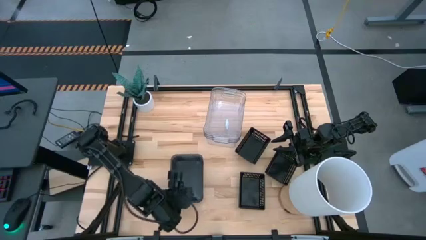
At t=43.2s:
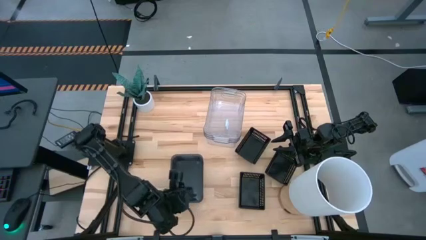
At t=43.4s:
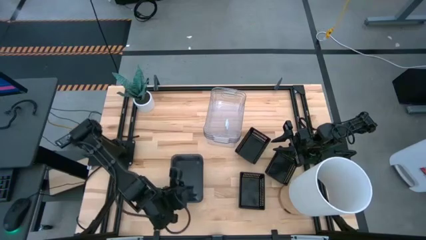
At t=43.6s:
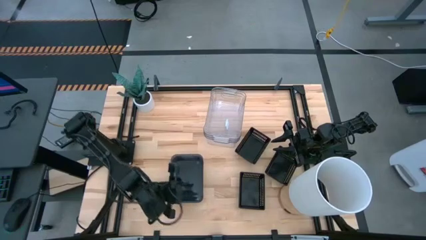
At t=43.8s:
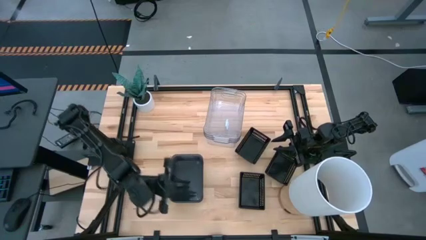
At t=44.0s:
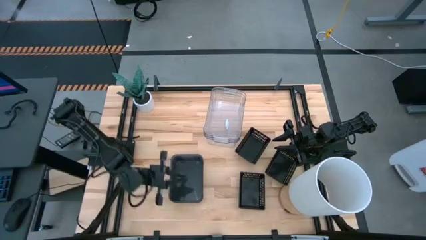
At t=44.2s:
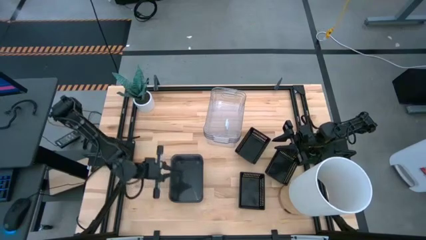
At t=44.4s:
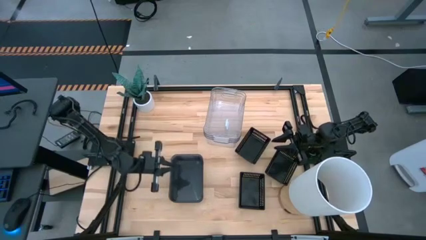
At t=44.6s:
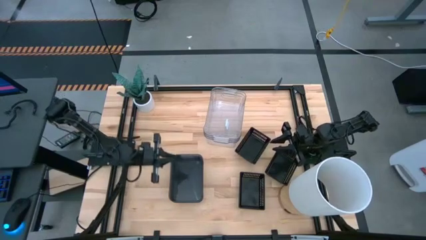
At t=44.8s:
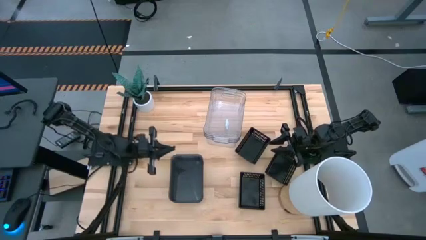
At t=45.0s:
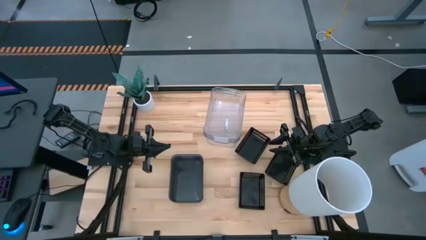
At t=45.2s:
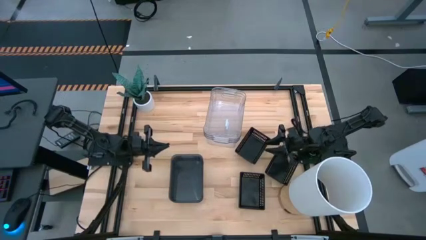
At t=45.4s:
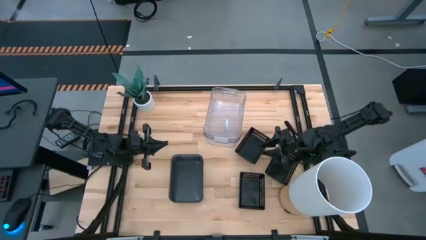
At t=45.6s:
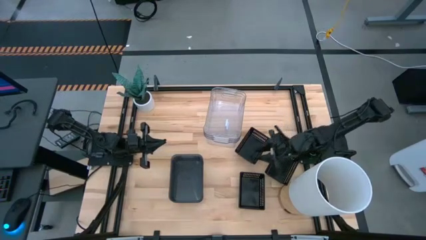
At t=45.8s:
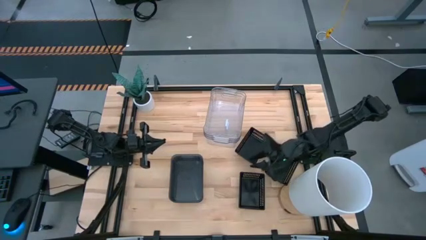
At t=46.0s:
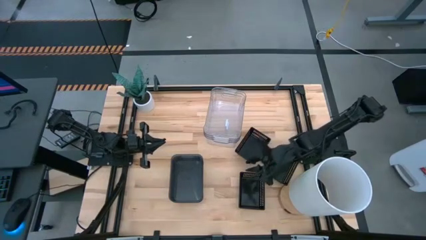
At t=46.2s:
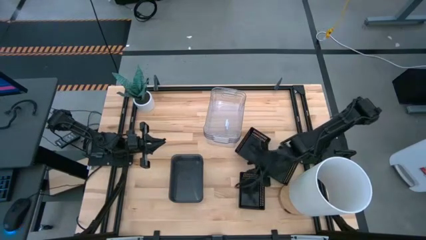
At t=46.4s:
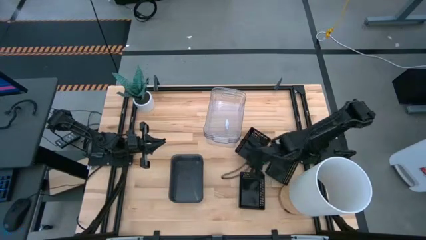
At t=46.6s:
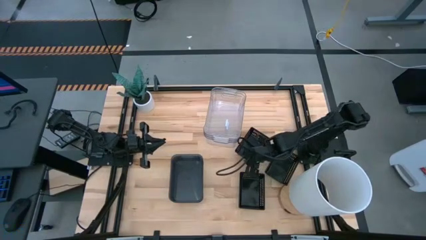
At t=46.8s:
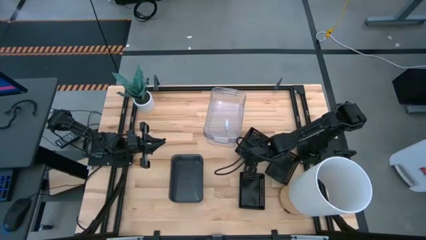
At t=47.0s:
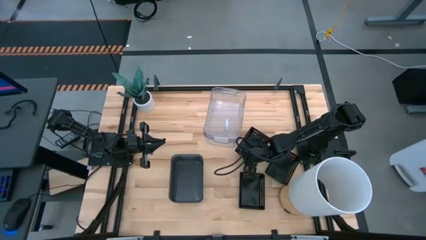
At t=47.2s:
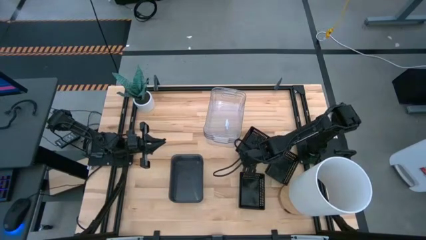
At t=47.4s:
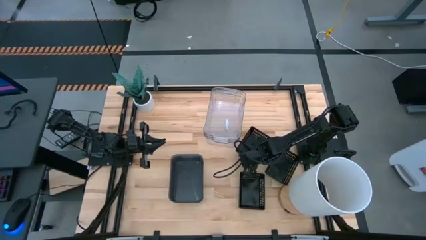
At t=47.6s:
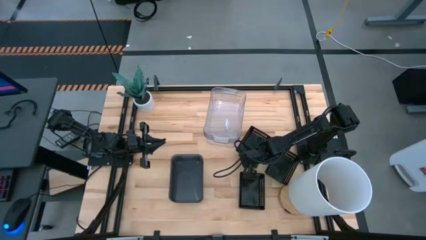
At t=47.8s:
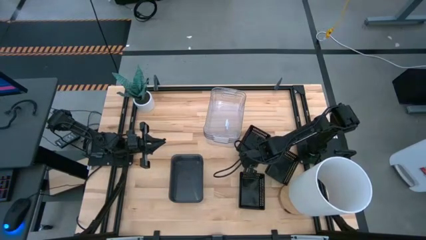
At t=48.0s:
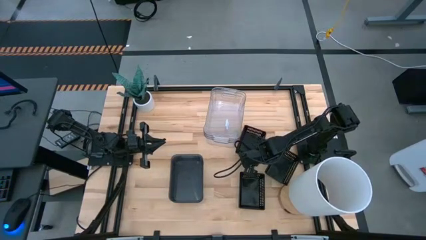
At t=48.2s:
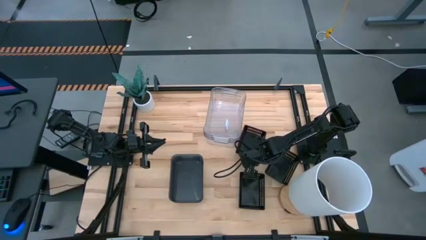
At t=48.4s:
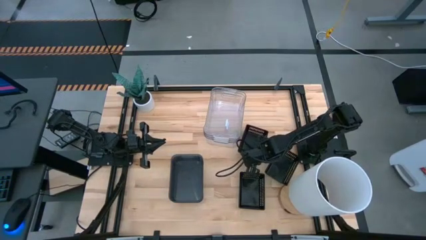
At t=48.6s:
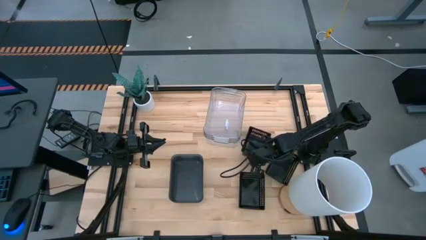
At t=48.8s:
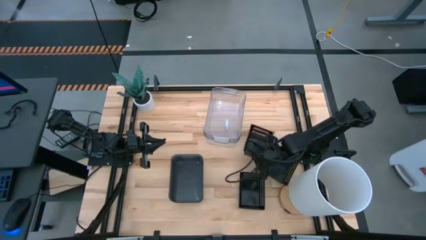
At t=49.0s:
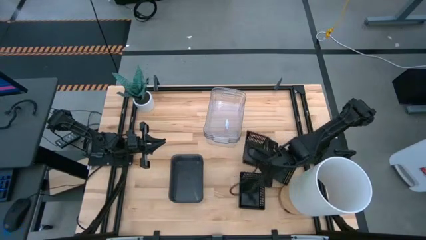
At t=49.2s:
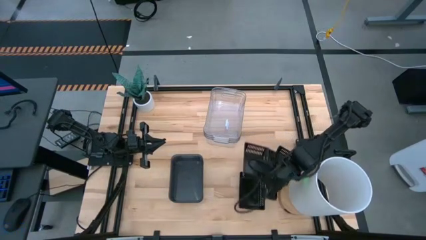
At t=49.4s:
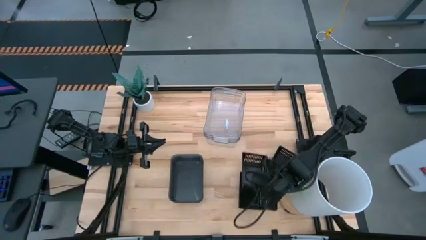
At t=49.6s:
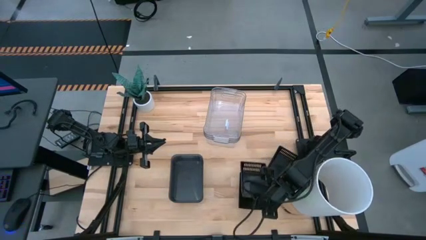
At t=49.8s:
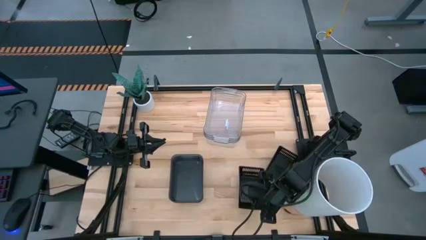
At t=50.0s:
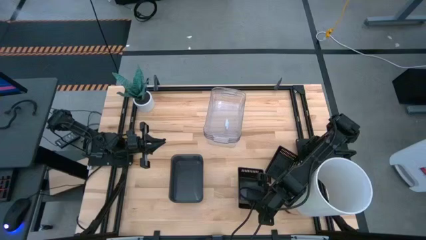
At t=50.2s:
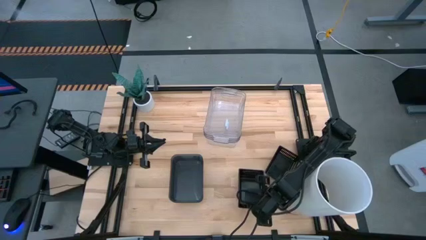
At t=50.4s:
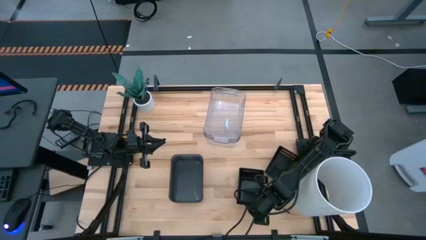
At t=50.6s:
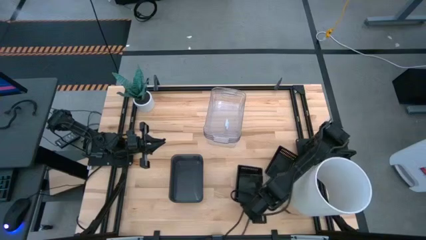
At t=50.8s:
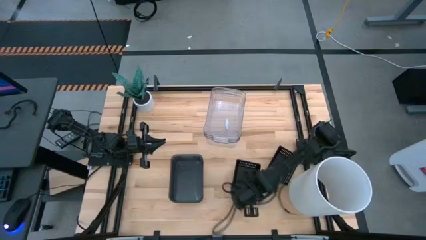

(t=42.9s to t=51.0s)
Stack the top left black bin on top of the bottom black bin

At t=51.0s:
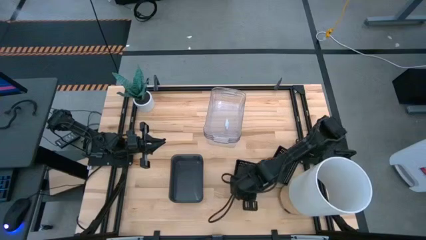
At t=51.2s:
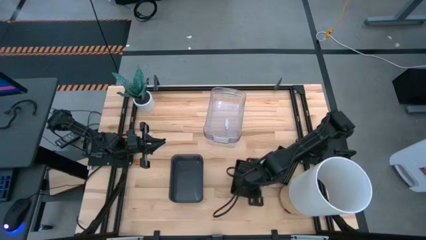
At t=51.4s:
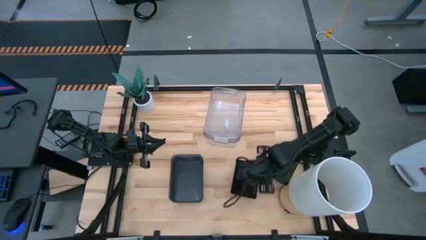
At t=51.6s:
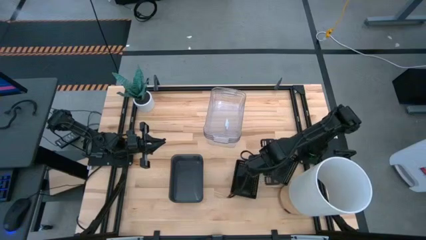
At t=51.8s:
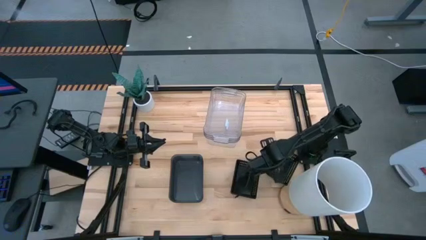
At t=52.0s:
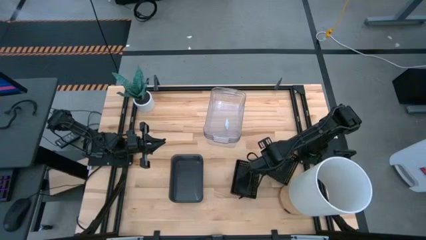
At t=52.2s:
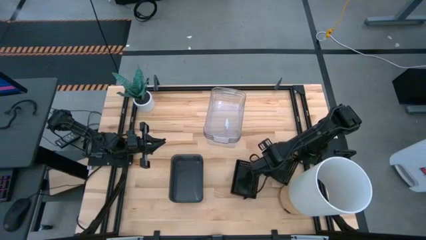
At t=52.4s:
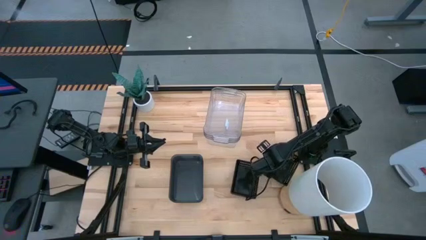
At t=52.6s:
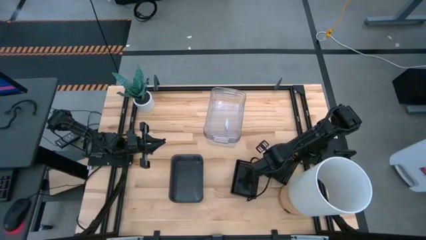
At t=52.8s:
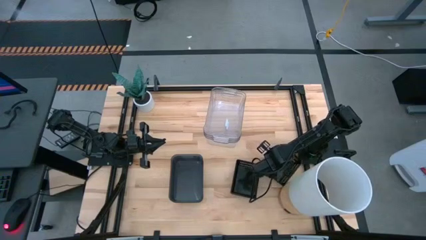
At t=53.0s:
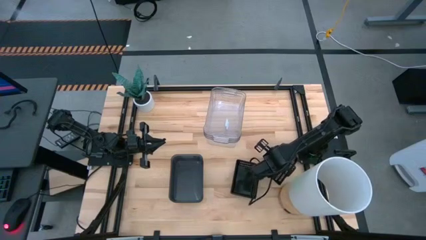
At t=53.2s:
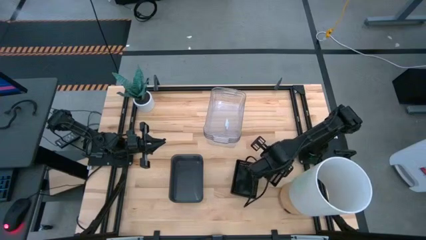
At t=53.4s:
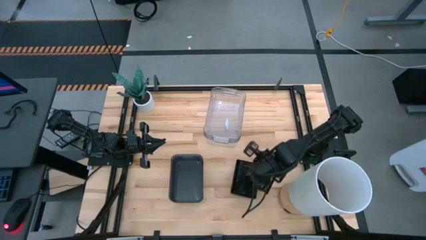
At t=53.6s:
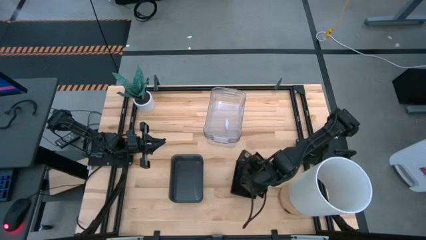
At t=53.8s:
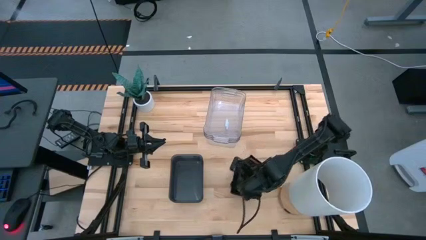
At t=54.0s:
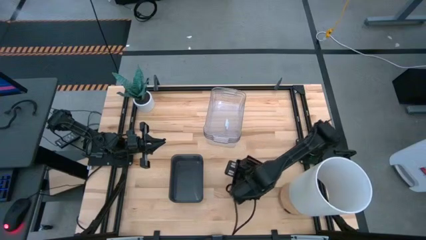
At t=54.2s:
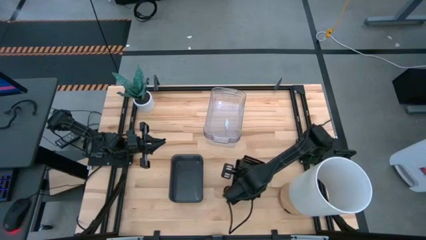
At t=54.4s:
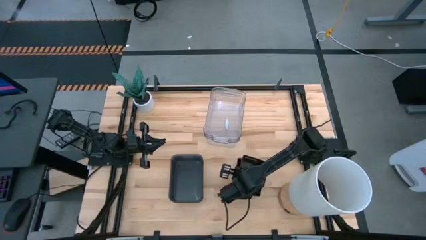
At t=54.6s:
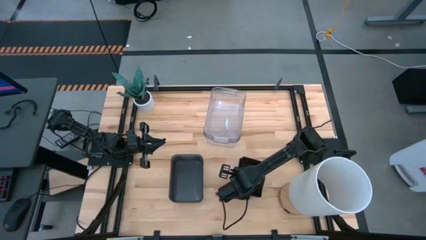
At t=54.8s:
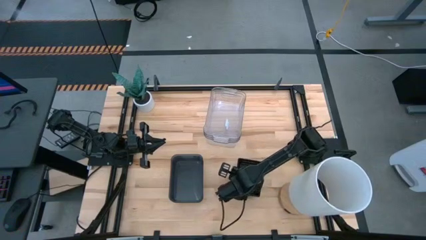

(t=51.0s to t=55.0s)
Stack the left black bin on top of the right black bin

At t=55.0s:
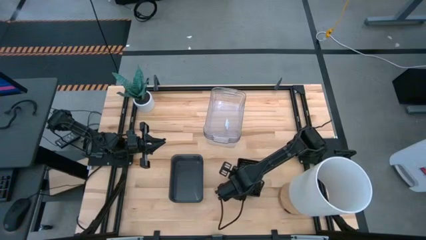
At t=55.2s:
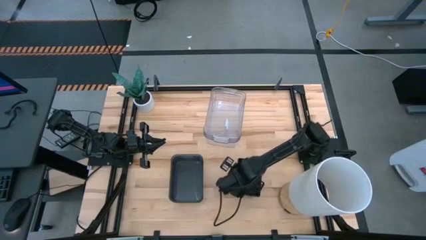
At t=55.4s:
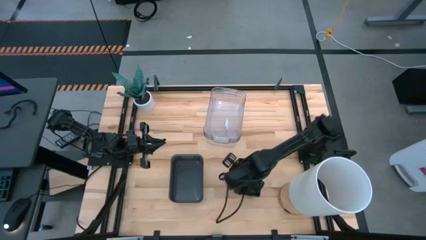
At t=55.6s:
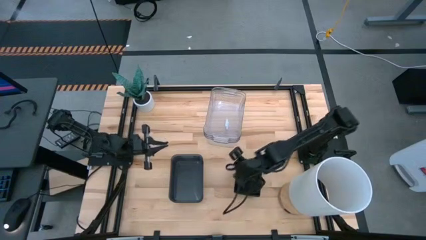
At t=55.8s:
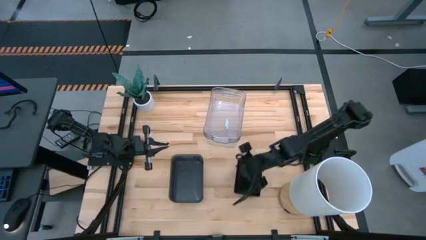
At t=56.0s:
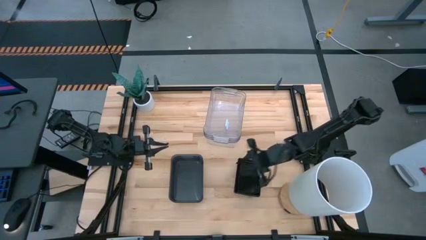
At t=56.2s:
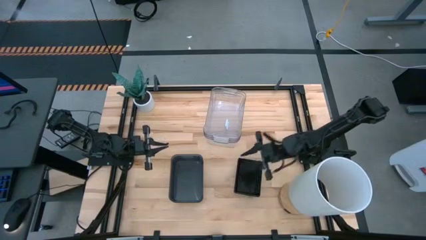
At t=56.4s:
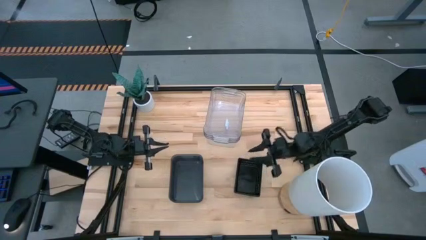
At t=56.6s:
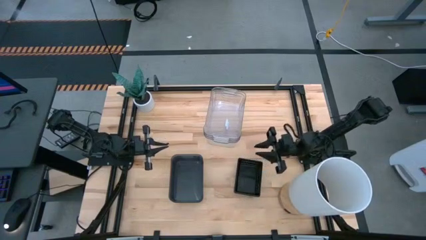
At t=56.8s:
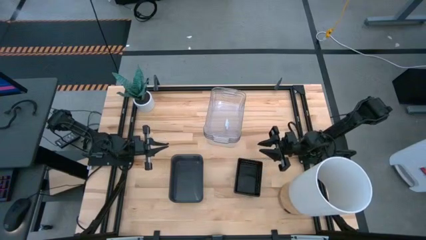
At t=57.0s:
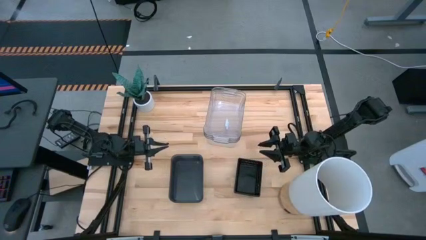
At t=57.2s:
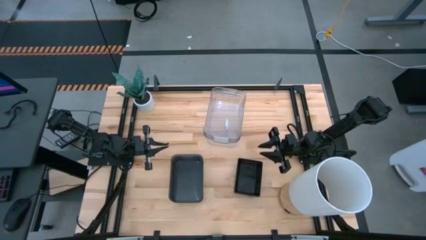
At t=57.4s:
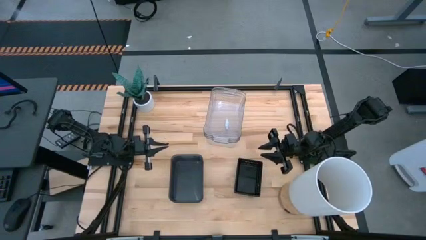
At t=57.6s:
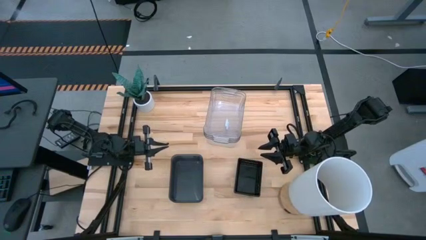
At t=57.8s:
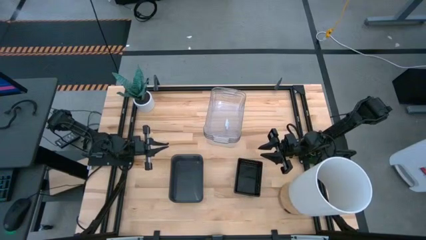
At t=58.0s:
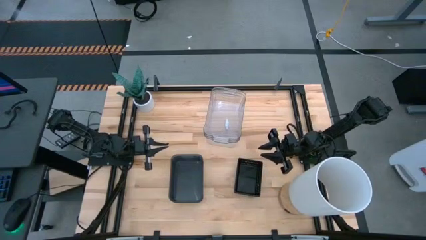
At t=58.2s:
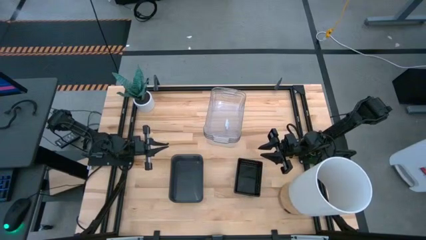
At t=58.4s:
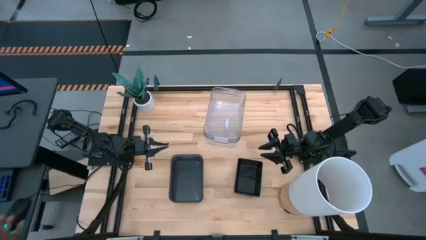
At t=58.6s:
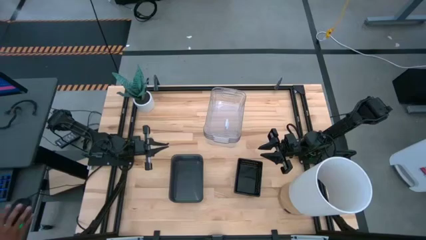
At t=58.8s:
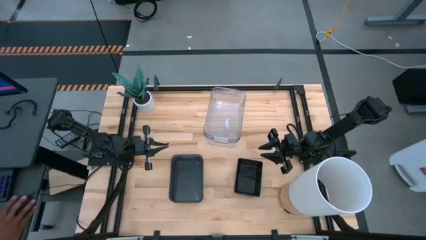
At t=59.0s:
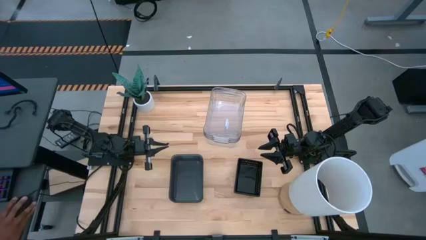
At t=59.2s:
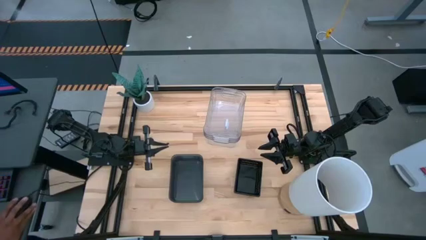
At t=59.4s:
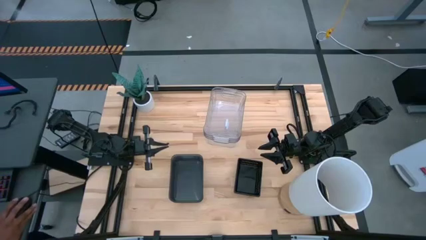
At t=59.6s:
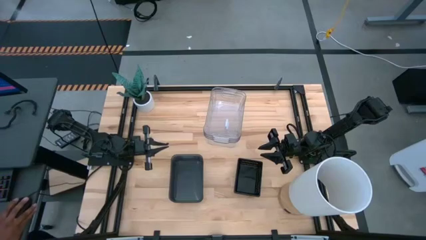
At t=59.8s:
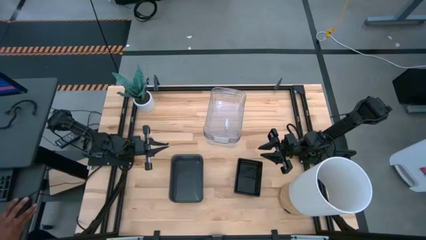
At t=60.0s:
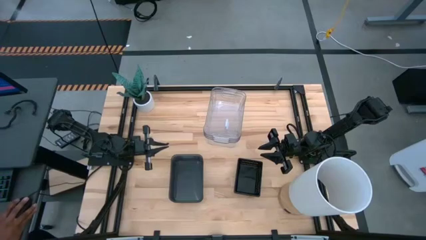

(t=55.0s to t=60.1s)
Return to Home Position
